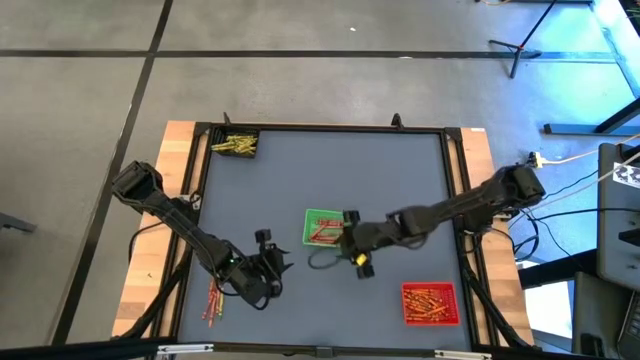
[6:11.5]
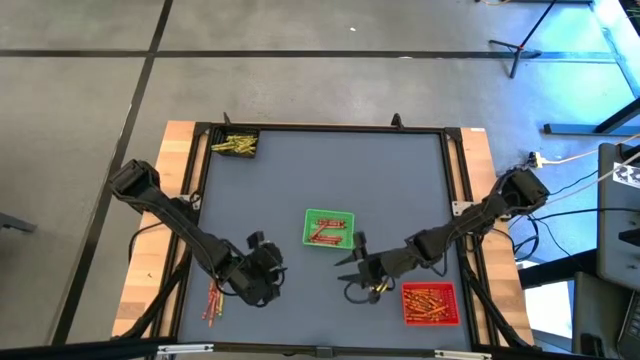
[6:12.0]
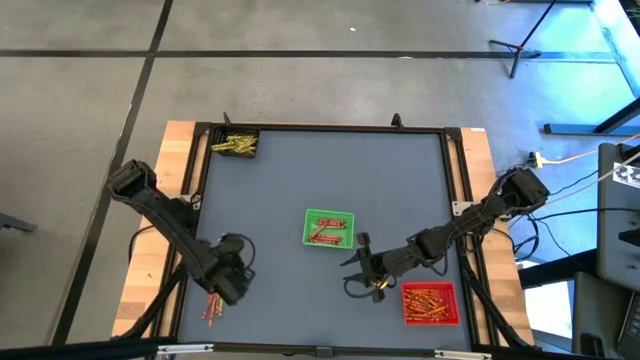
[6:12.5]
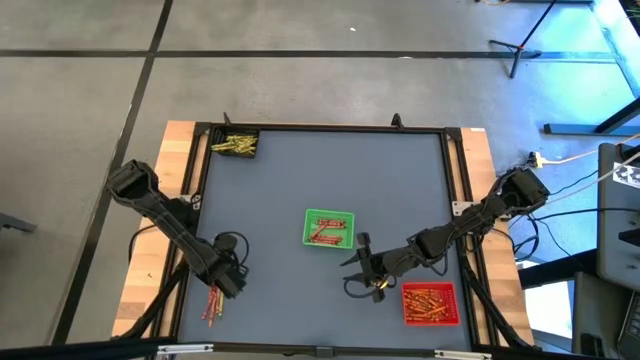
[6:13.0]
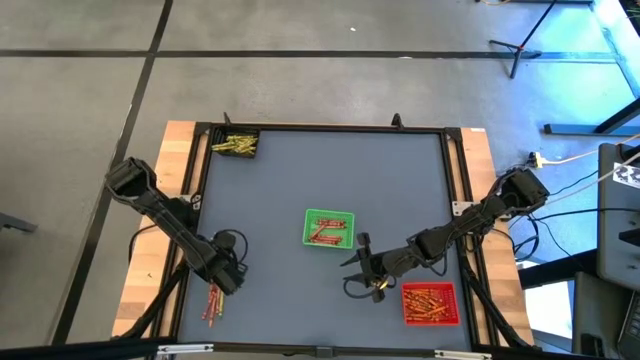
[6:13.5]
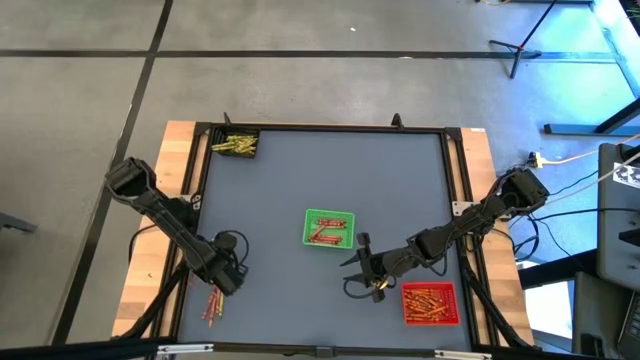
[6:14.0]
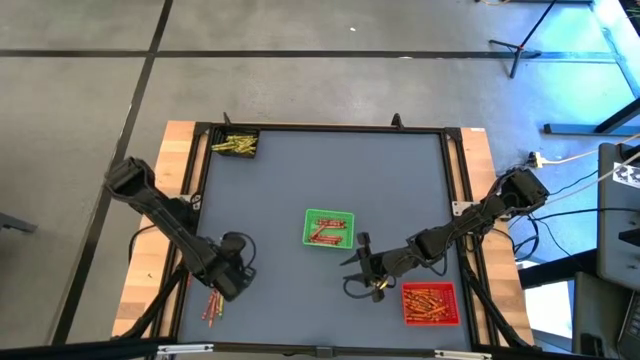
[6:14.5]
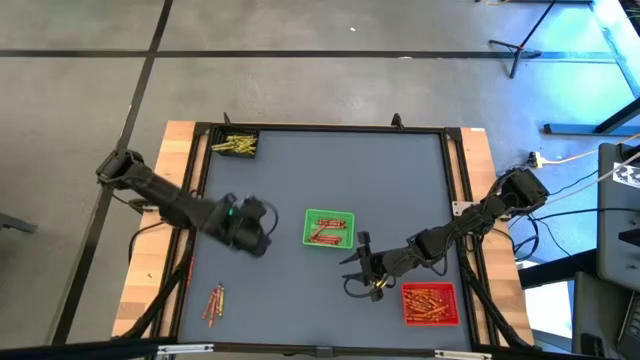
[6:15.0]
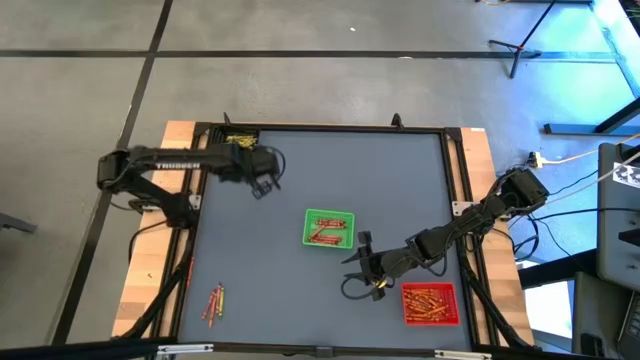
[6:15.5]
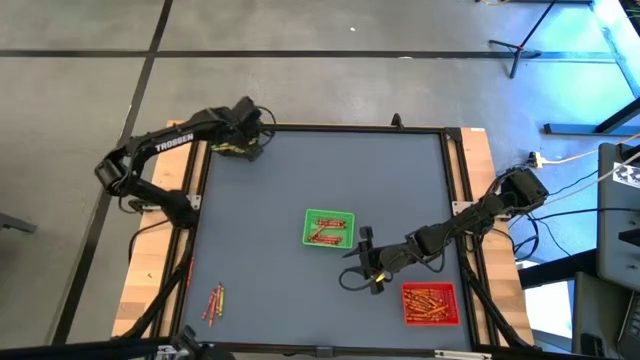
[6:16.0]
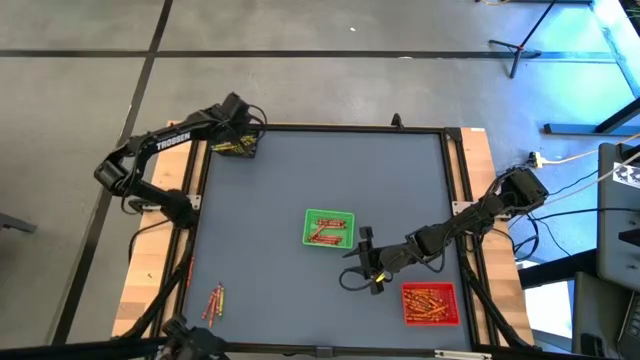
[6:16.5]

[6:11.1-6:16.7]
Task: Sort crayons
Put the green crayon into the black bin

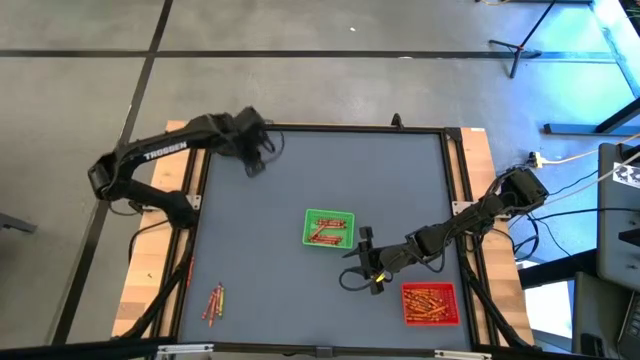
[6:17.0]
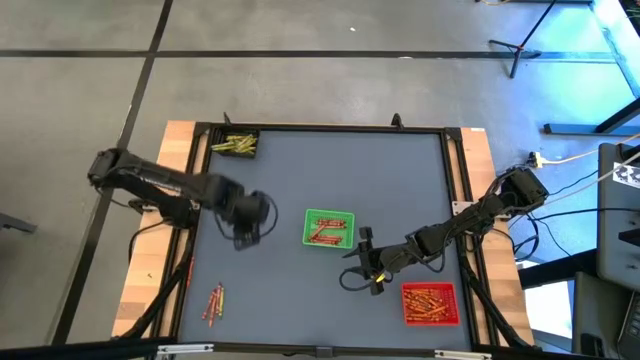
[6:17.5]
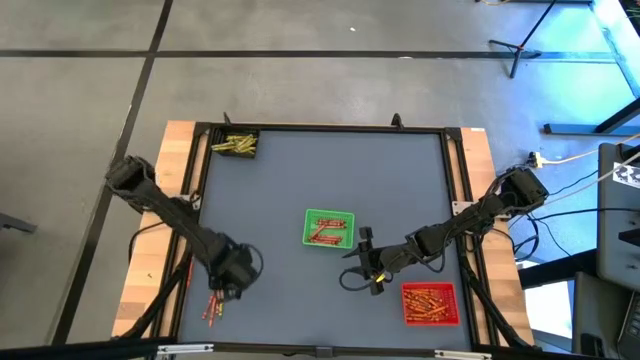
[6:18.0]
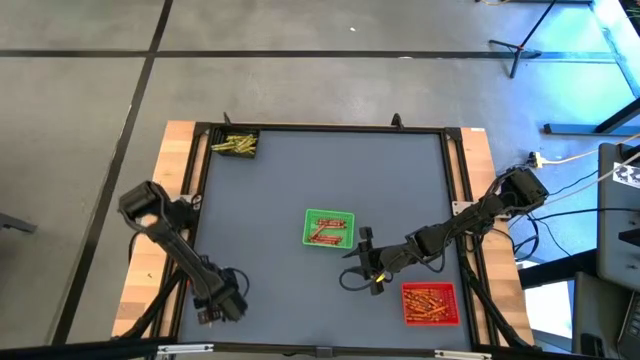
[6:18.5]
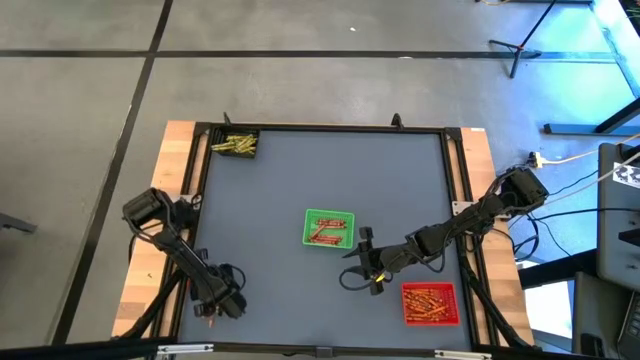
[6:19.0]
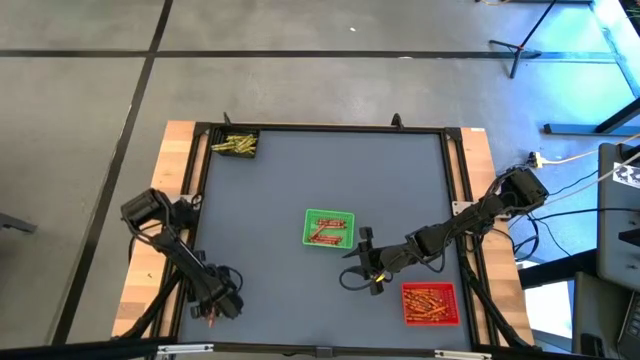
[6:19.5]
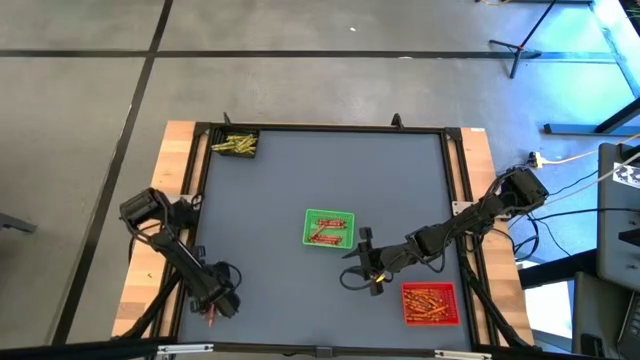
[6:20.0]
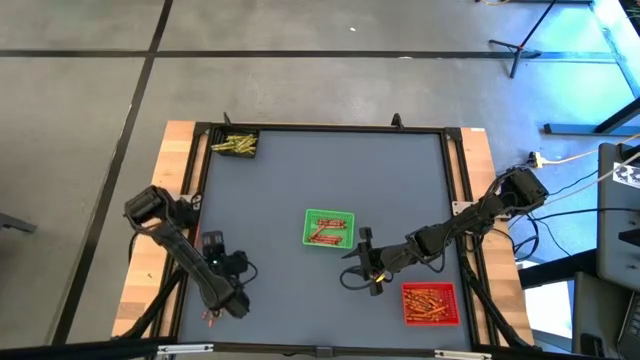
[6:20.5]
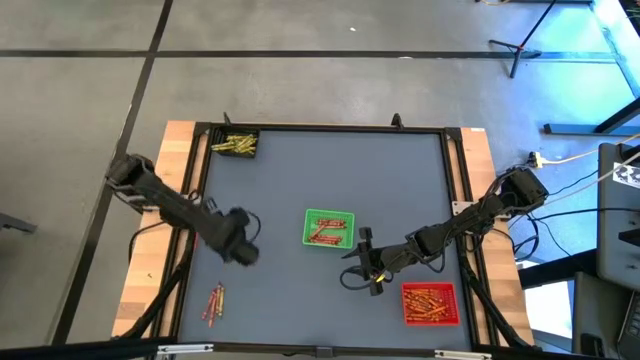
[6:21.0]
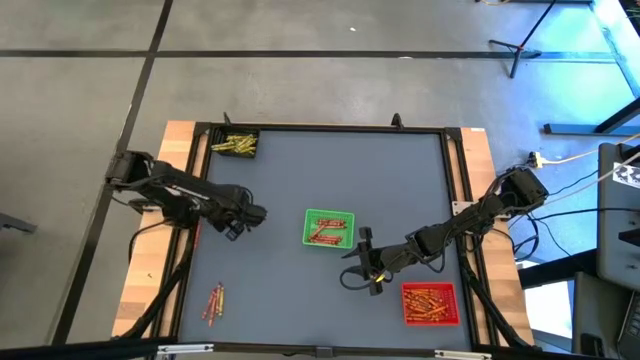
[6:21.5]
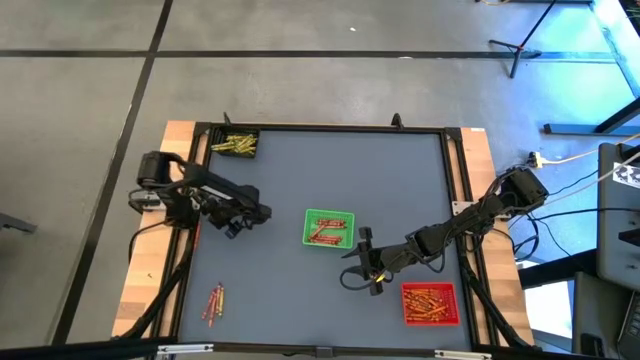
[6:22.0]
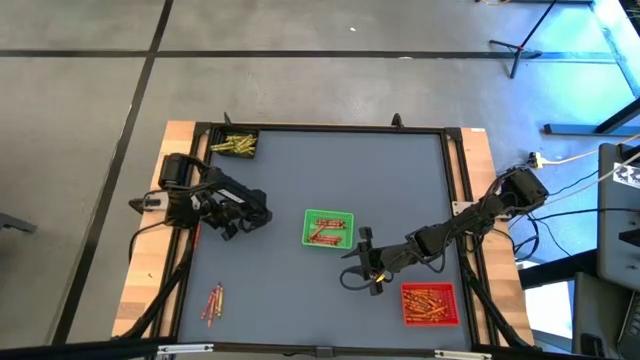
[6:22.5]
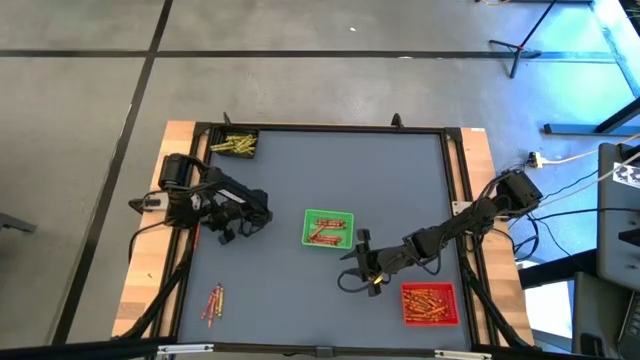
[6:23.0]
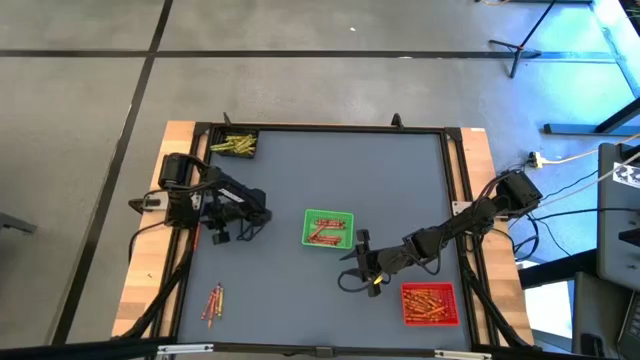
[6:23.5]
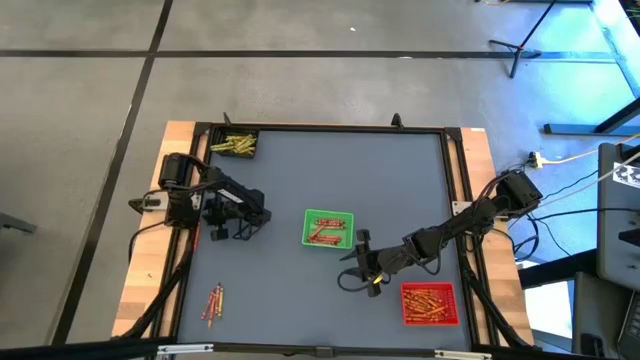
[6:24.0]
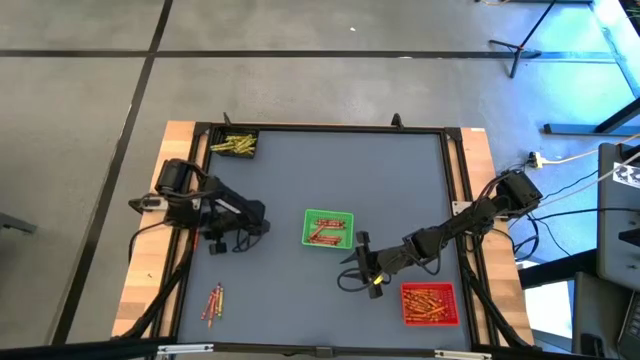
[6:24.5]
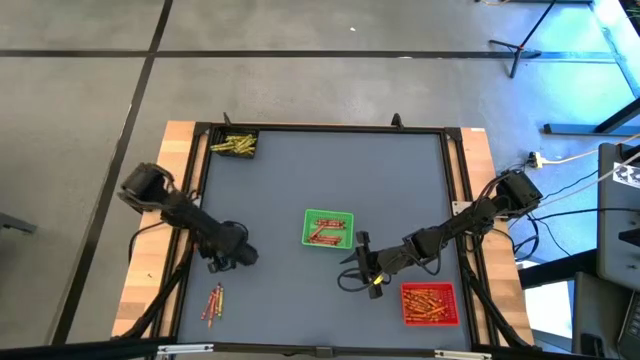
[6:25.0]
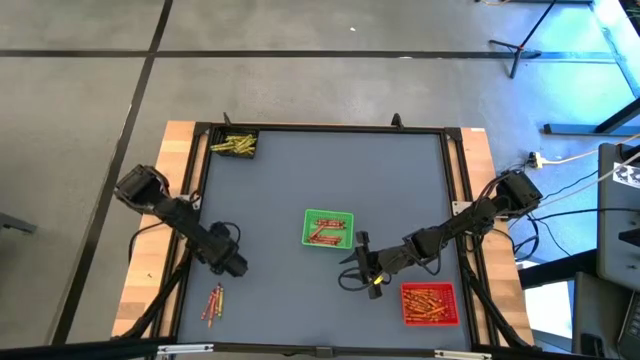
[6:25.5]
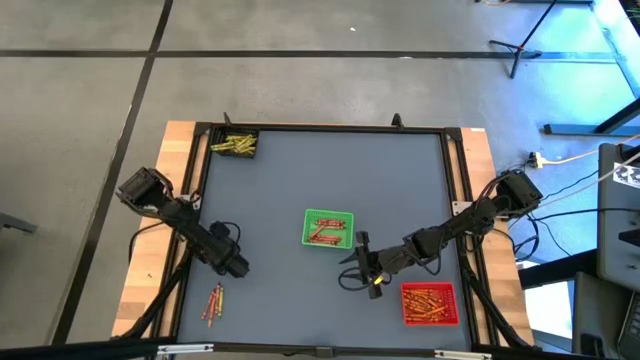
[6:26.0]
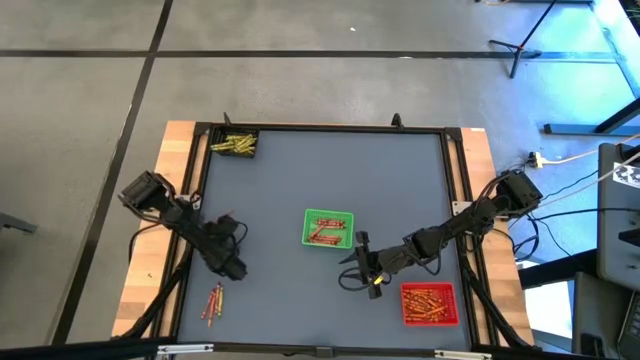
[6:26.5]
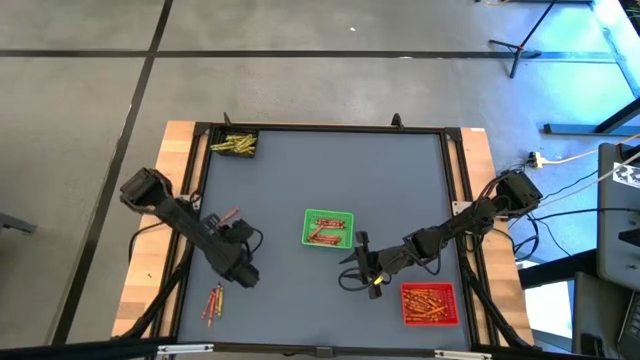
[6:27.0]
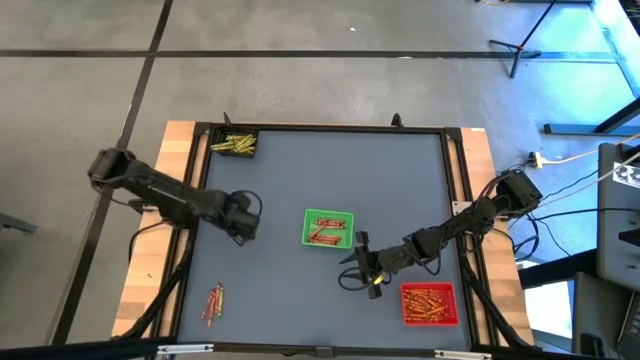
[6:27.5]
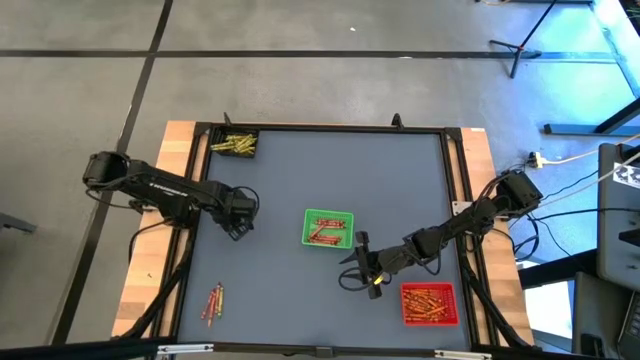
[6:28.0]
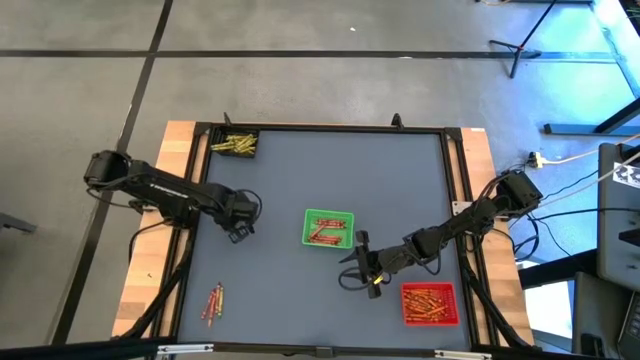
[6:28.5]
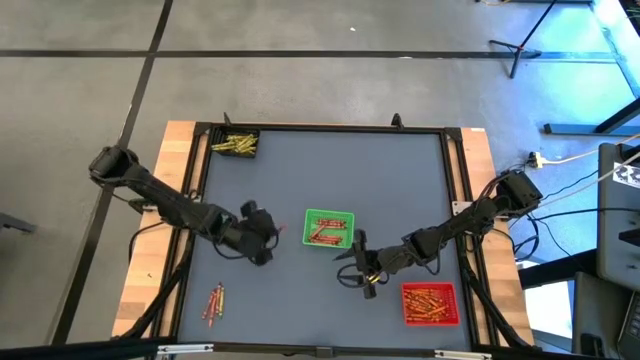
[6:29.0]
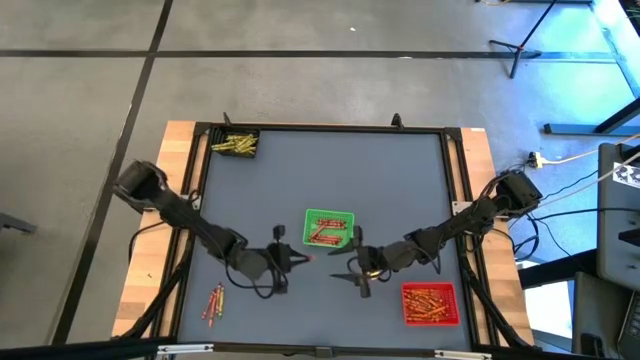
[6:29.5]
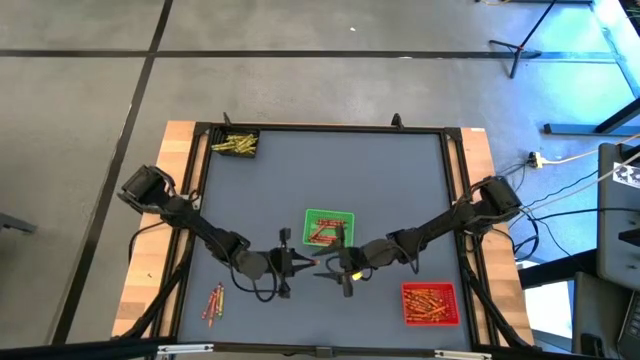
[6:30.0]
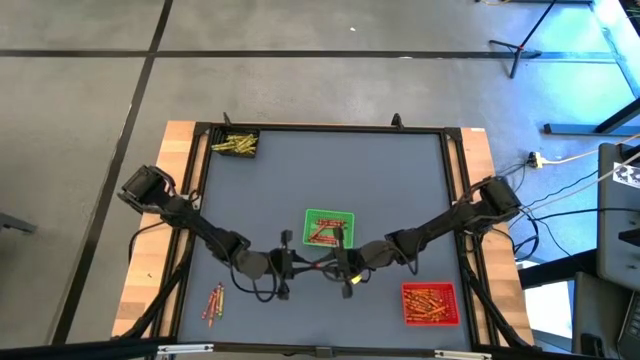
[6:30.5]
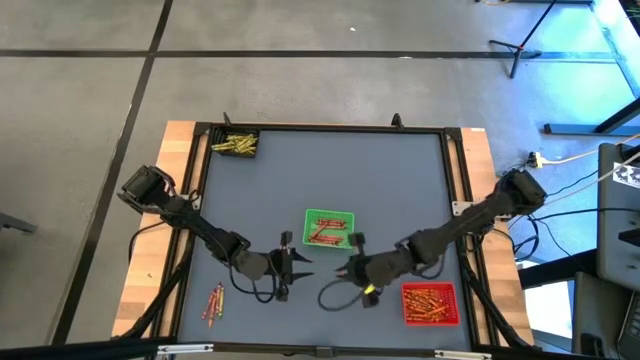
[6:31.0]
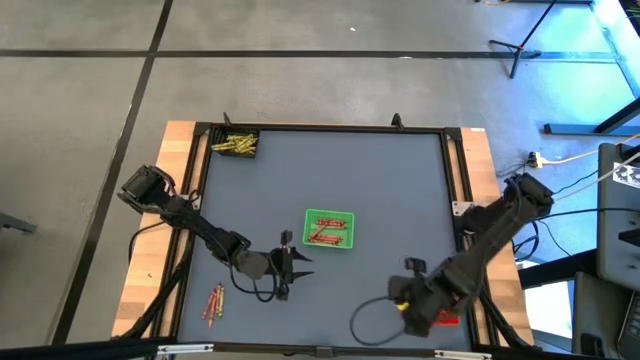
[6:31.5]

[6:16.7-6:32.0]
Put the orange crayon into the red bin
